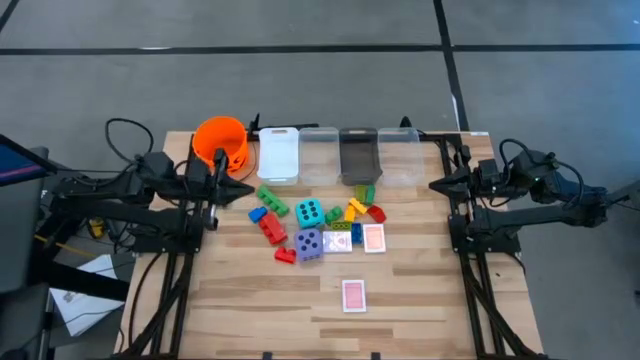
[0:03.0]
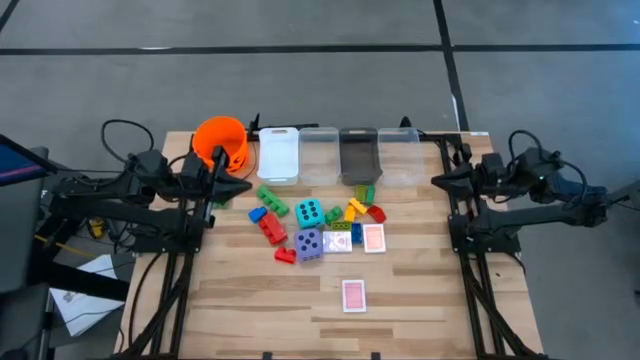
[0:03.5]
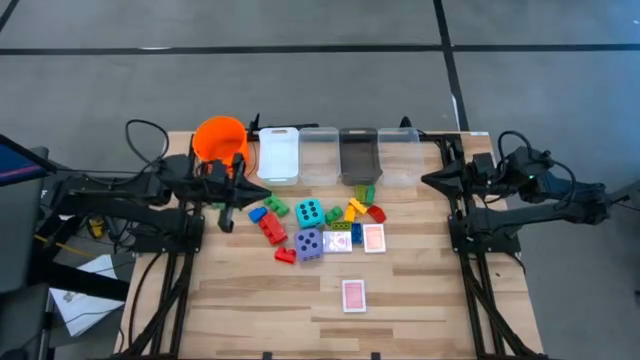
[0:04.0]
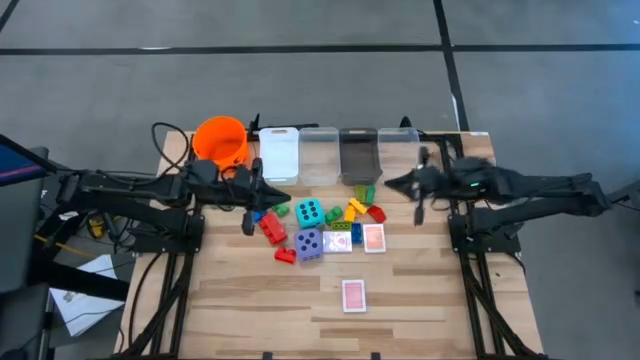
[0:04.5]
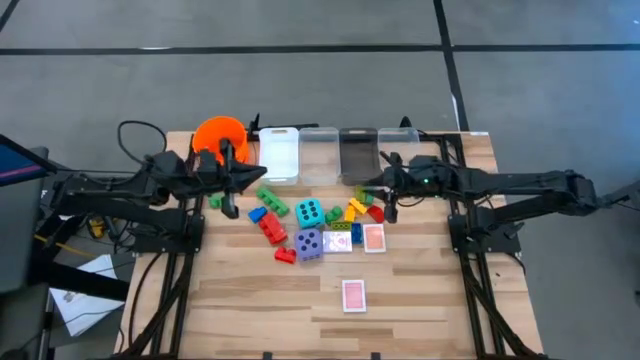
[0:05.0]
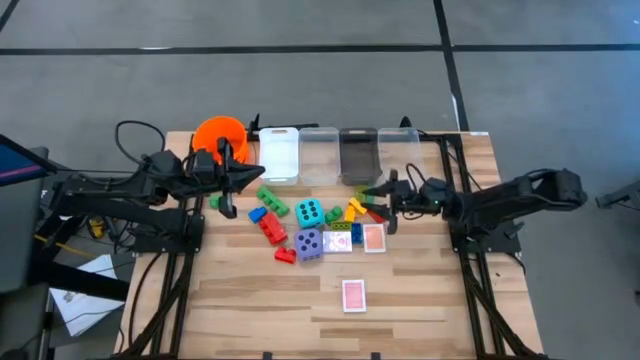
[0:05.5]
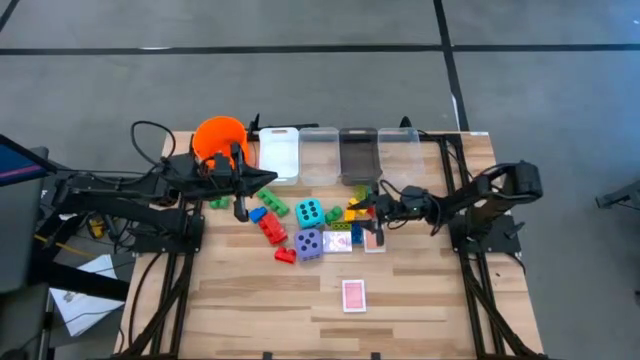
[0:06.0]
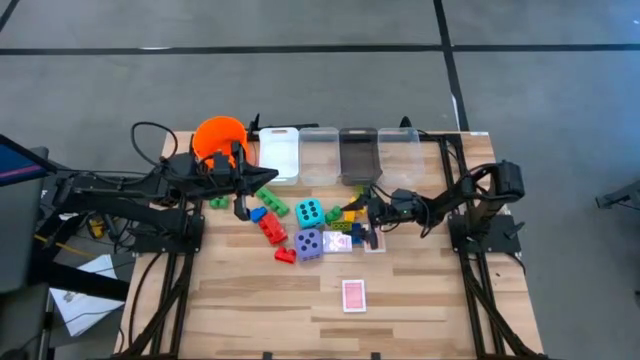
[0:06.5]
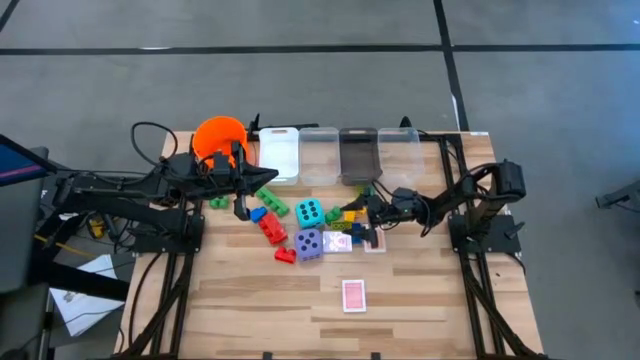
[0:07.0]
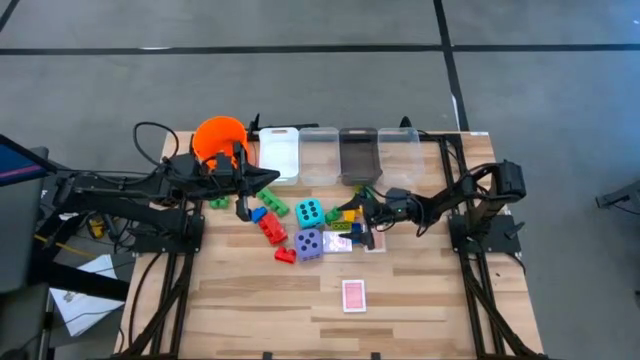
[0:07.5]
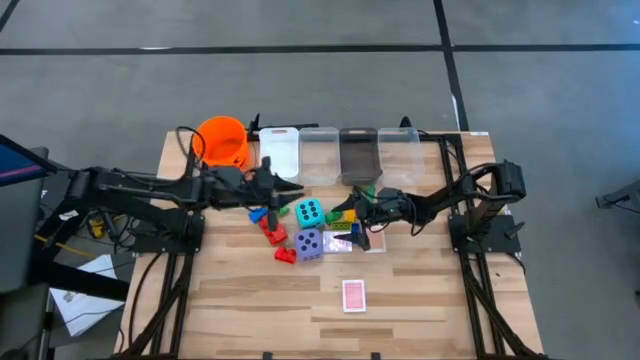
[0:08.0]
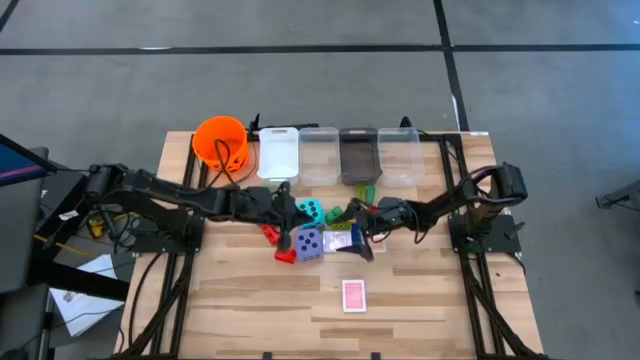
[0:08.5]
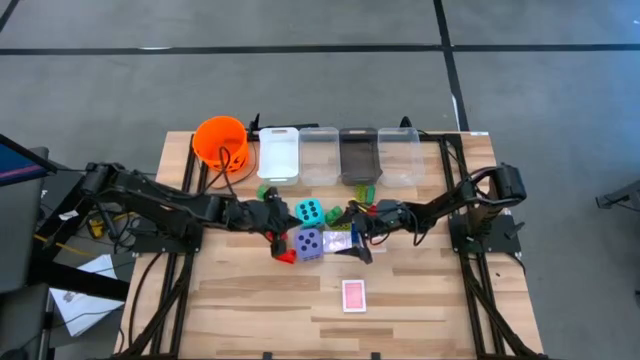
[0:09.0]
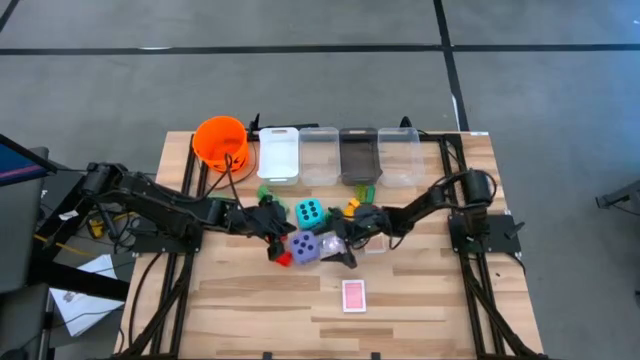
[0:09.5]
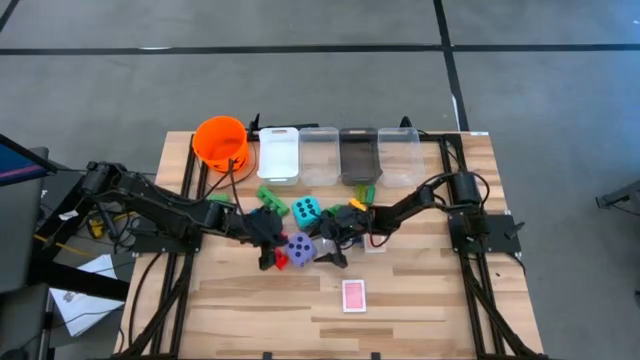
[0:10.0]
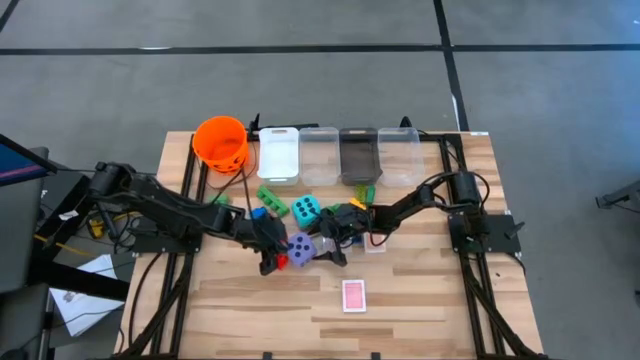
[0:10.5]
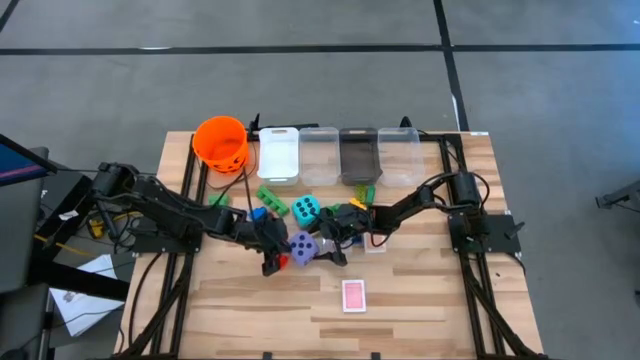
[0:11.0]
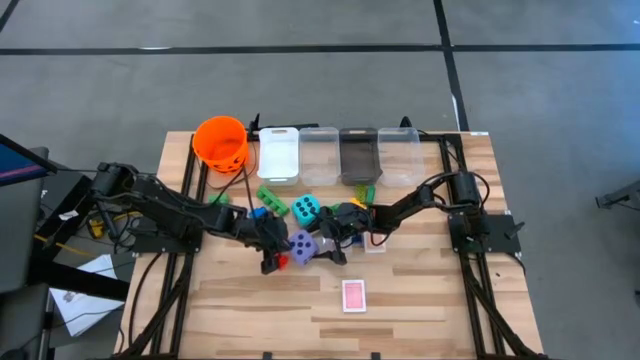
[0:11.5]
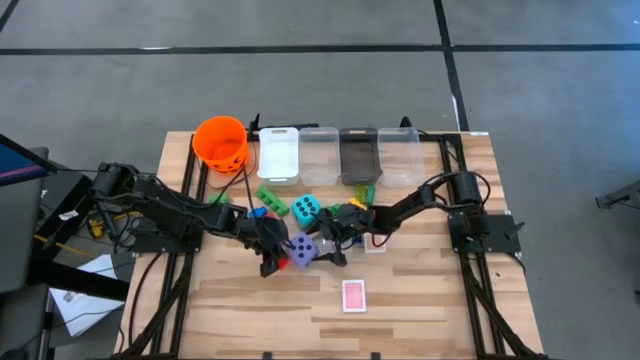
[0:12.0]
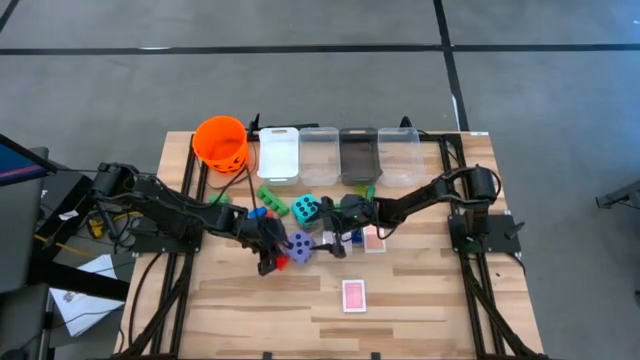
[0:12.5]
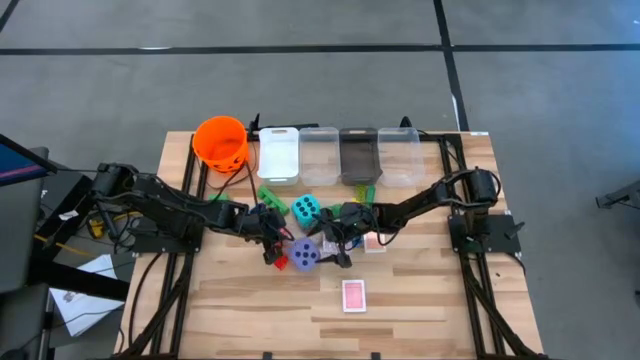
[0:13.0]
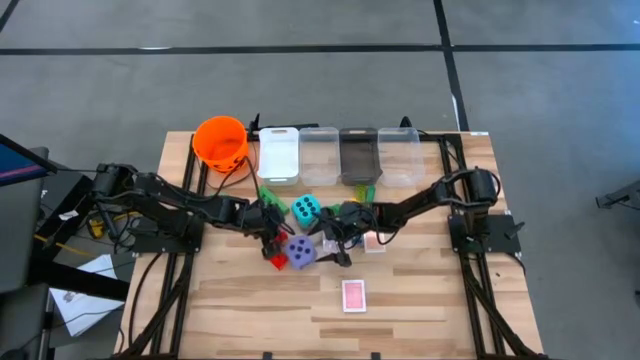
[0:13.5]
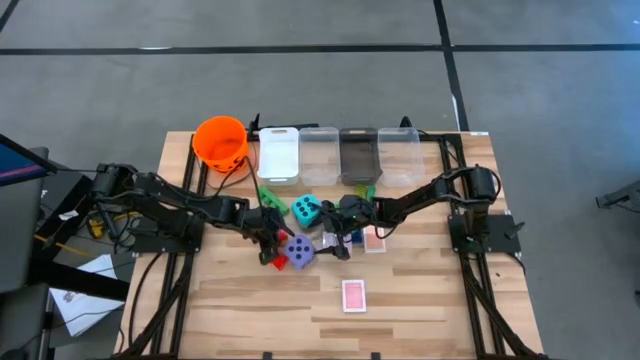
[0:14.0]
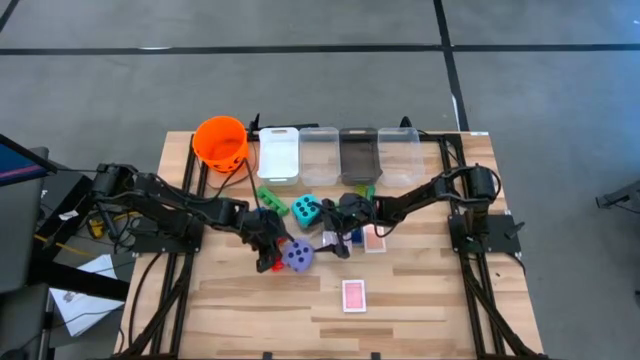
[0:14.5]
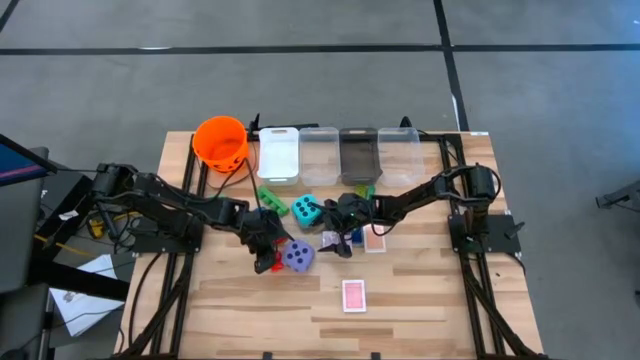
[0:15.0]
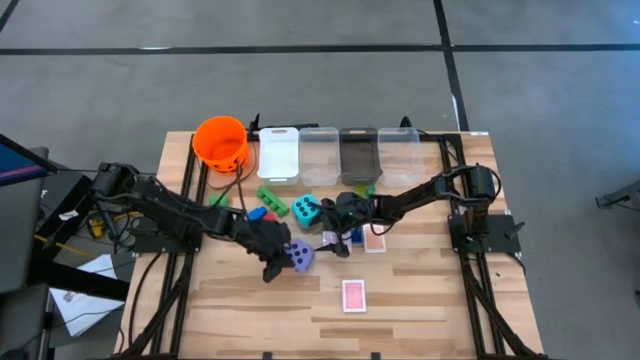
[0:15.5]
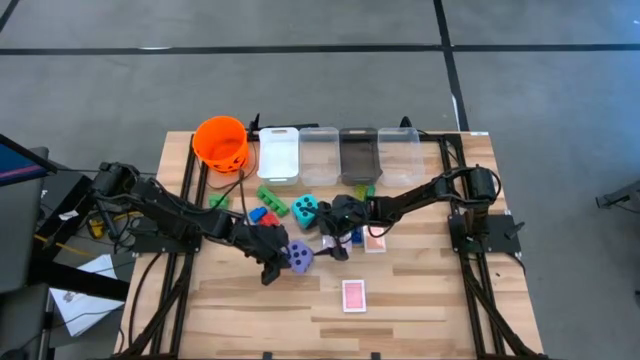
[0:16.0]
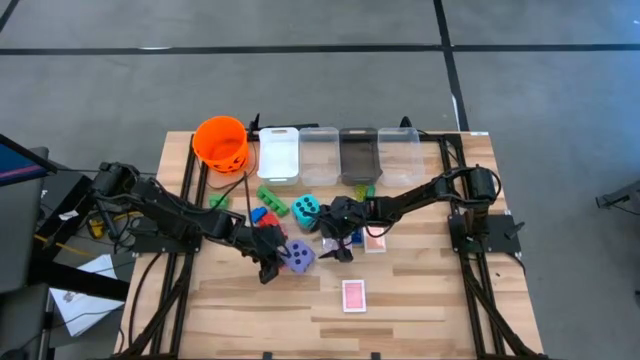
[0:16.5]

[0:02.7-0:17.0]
Task: Pick & Place Toys
Put the purple dice into the left transparent bin

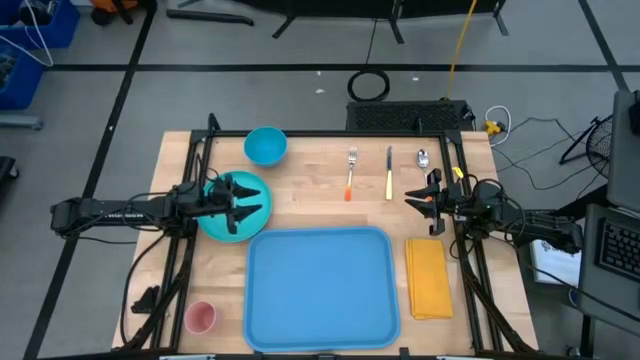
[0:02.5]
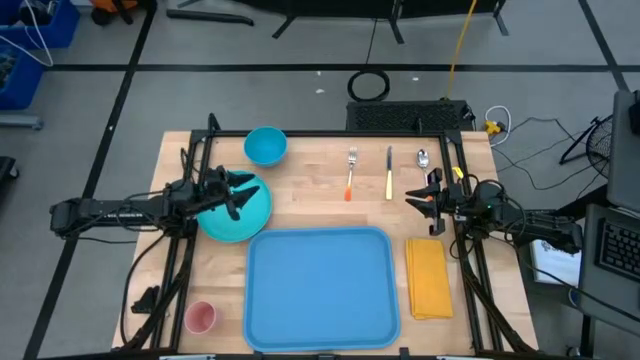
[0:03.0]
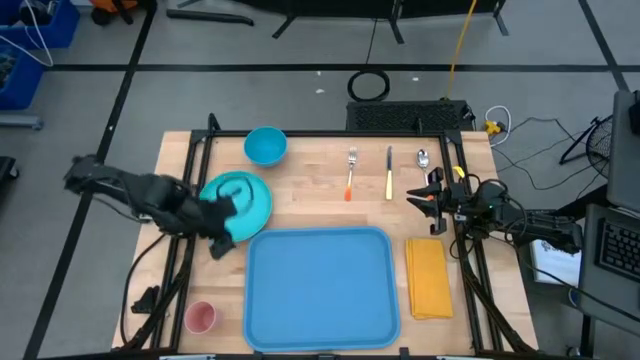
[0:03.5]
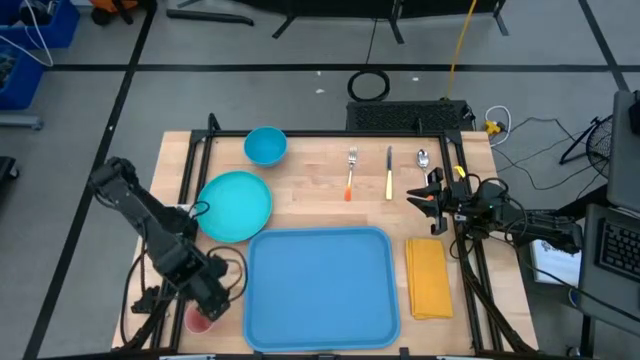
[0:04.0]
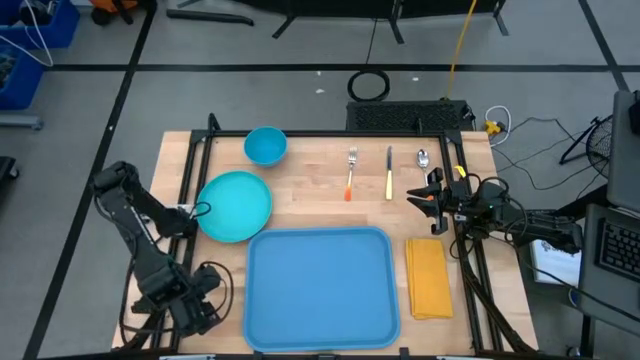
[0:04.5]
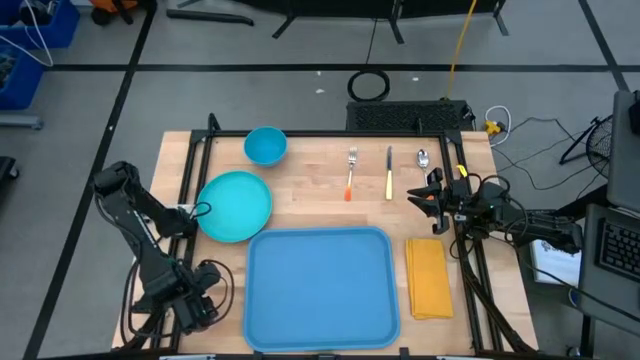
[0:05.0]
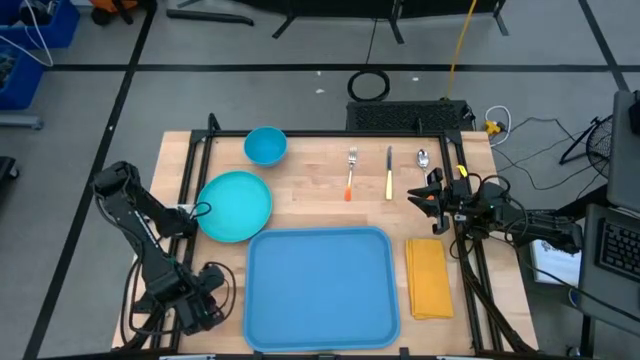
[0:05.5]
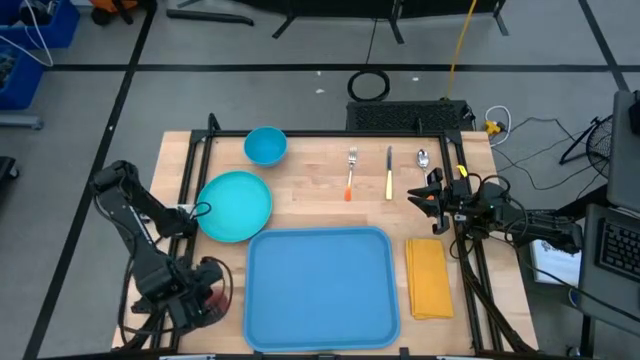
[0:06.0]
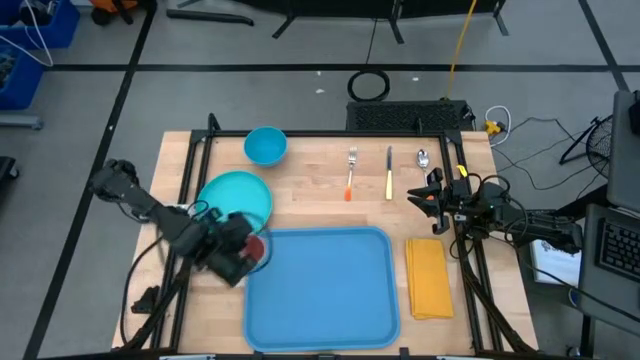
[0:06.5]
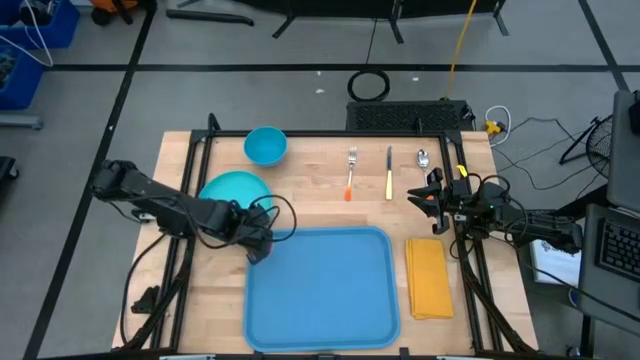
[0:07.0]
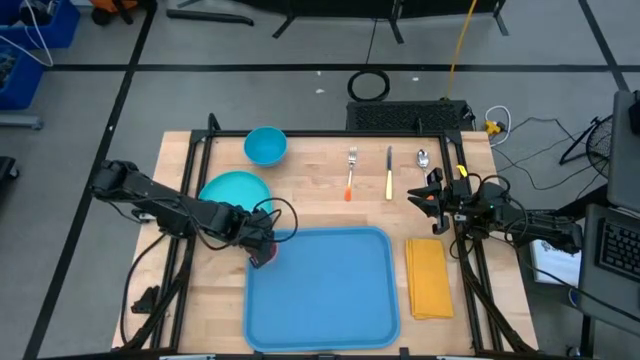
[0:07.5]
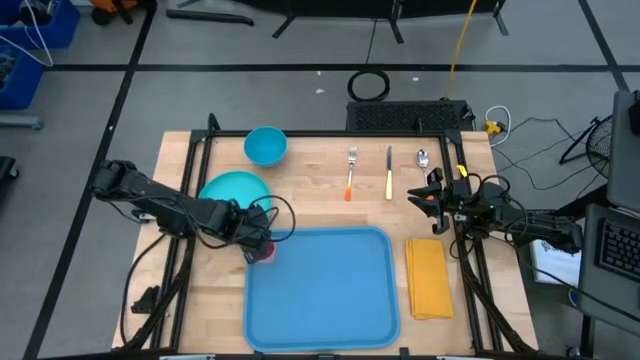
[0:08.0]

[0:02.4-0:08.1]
Task: Set up tray
Put the pink cup on the top left of the blue tray
